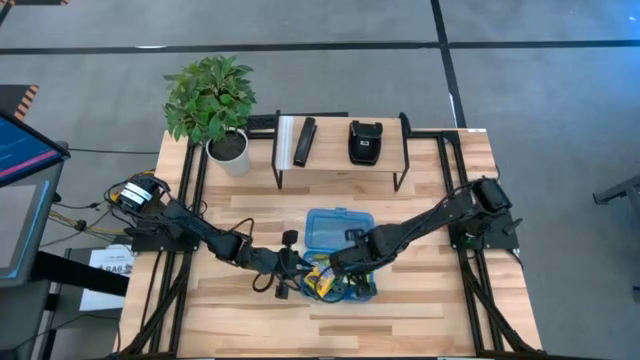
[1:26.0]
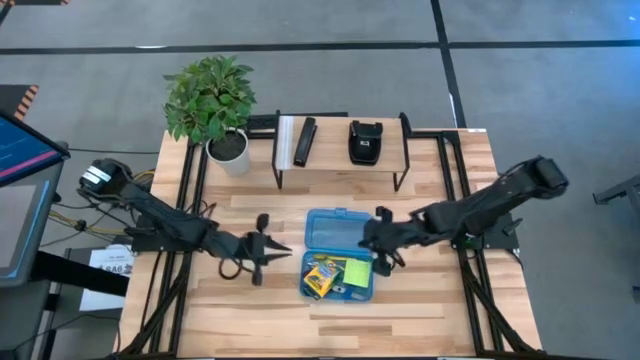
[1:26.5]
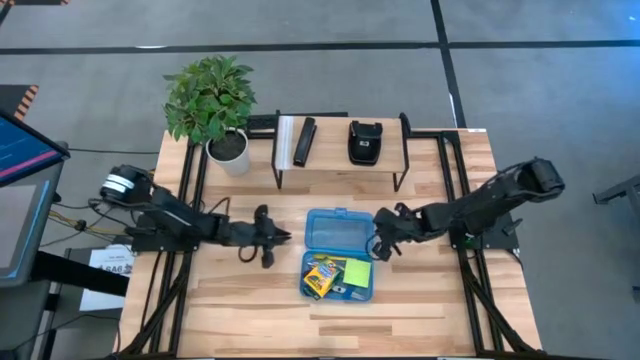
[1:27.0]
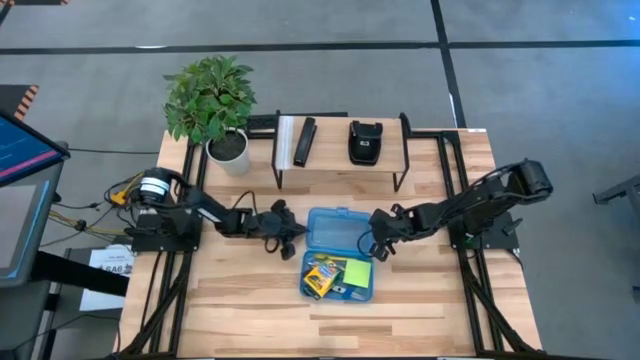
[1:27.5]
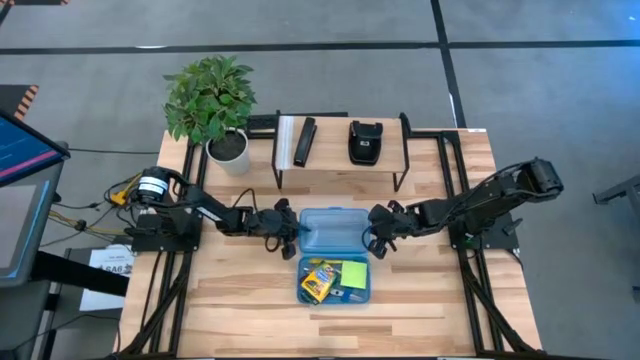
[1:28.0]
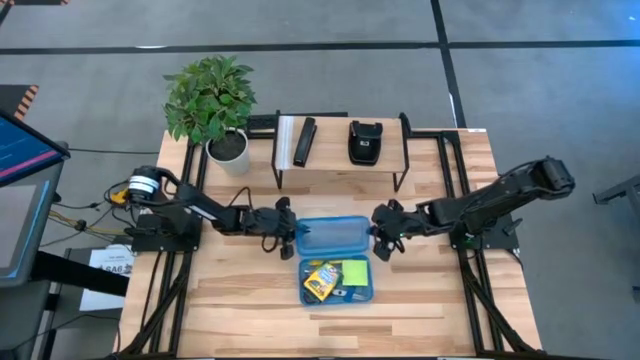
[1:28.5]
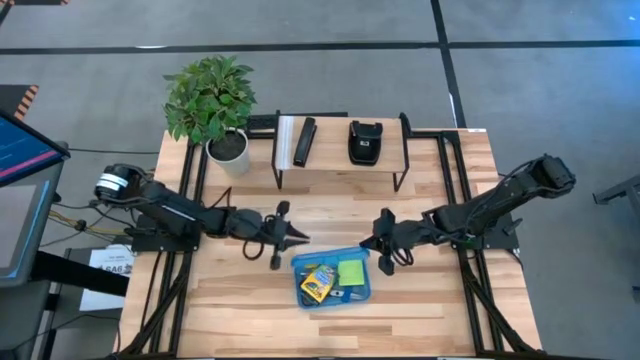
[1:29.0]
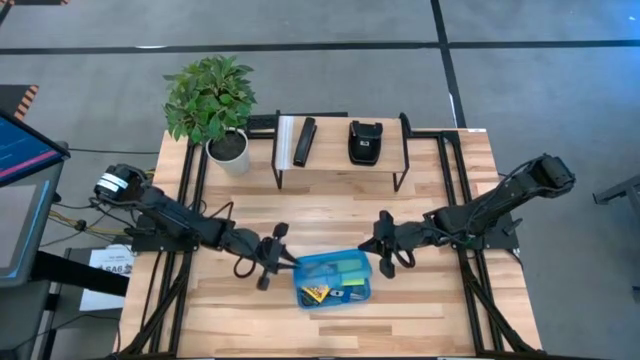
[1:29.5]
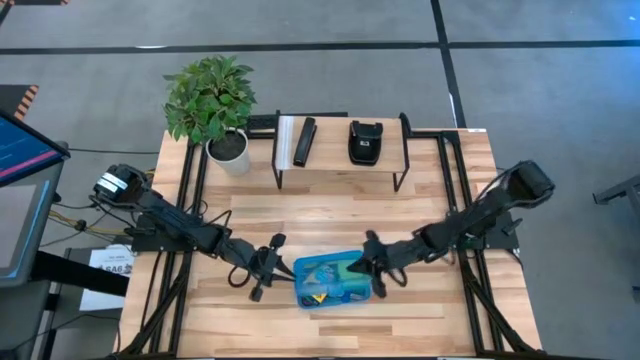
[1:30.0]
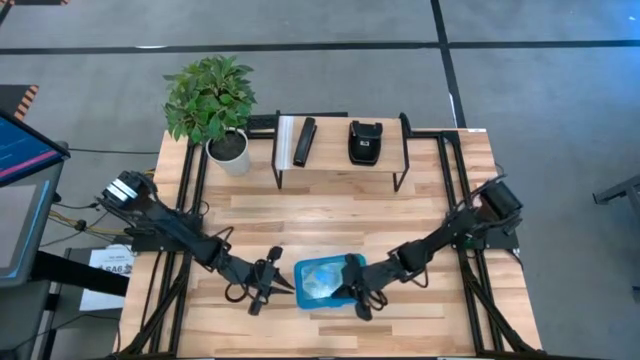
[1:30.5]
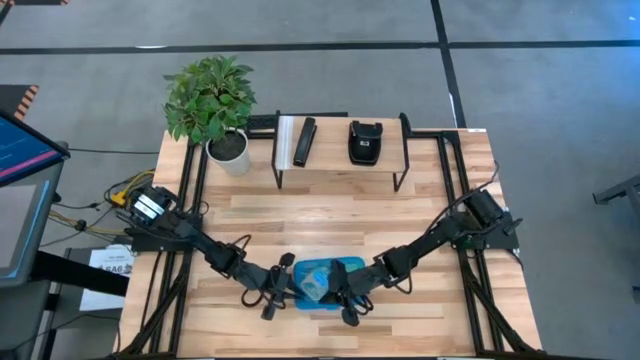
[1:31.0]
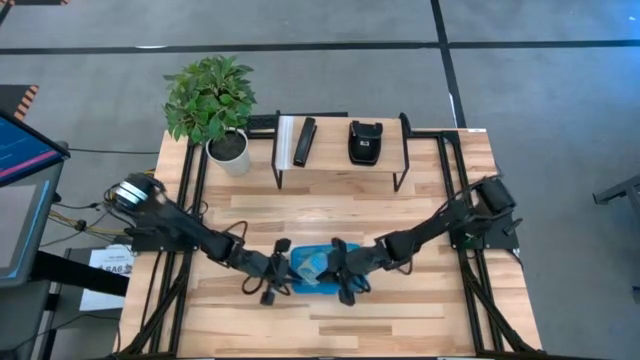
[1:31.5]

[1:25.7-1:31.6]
Task: Pack school essentials
Close the supply box

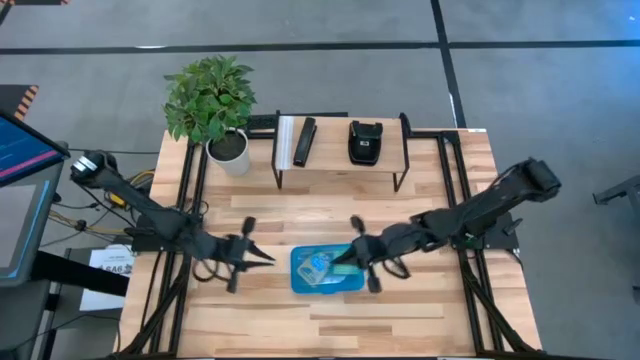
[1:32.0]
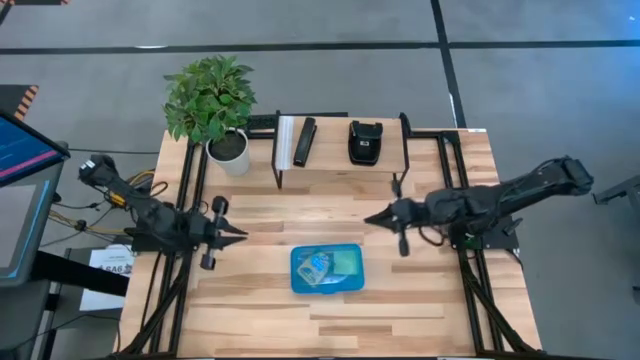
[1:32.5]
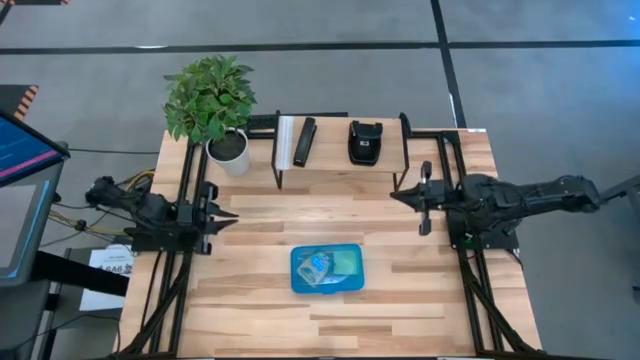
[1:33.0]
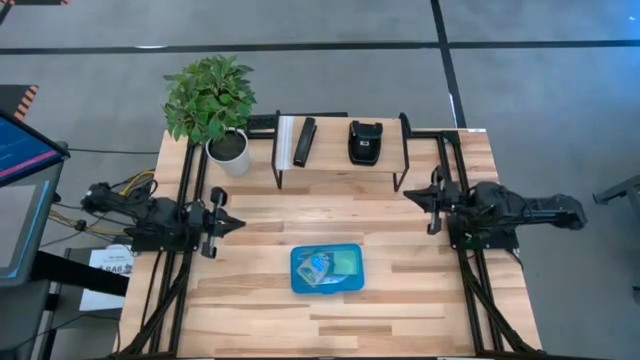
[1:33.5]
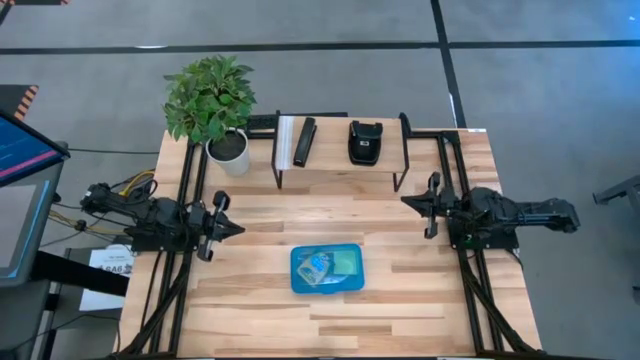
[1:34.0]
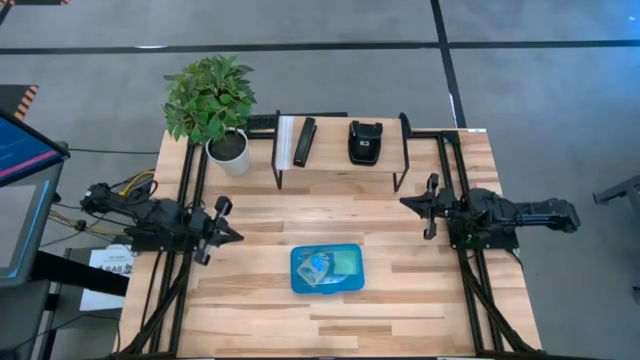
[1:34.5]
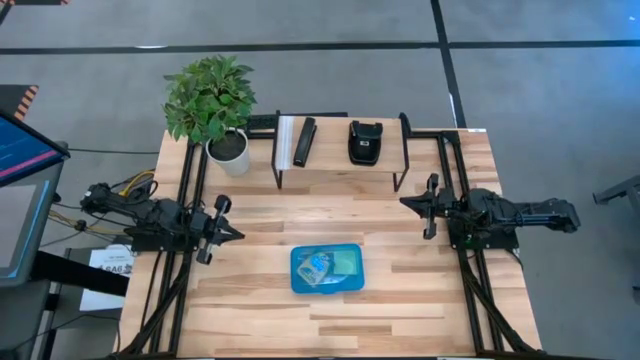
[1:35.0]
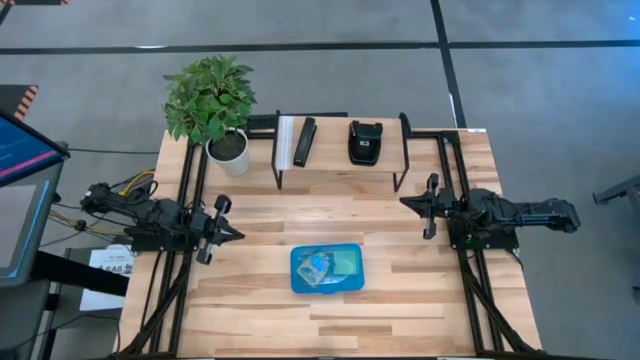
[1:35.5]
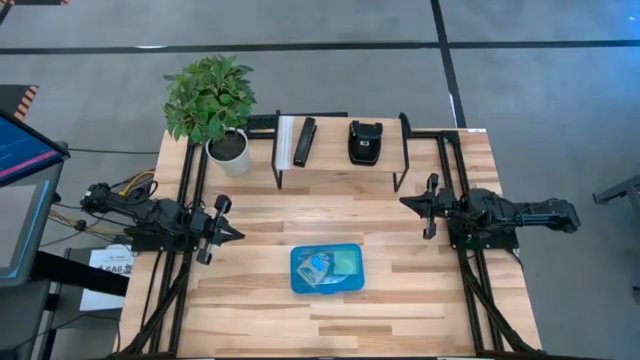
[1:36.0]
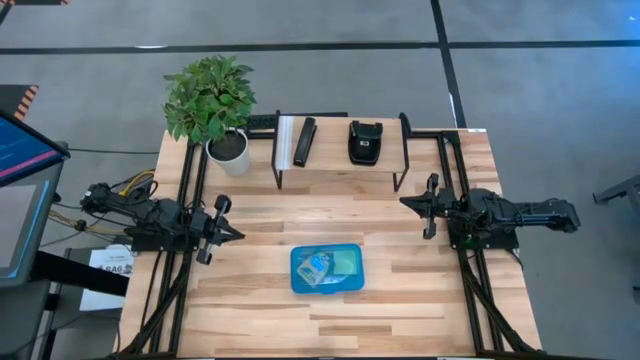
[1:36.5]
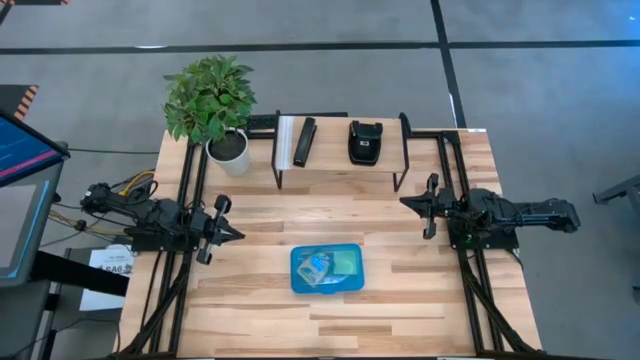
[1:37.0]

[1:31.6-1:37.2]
Return to Home Position

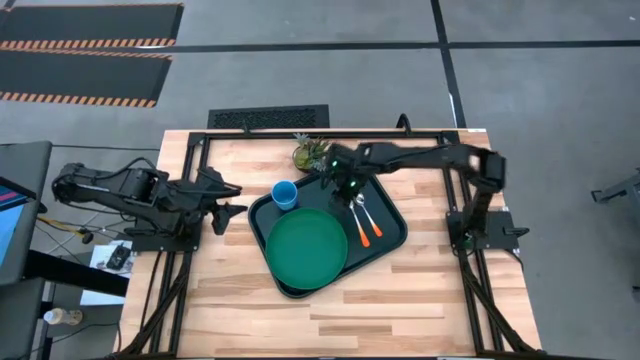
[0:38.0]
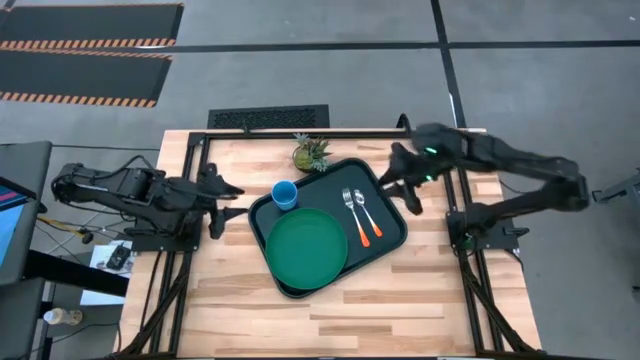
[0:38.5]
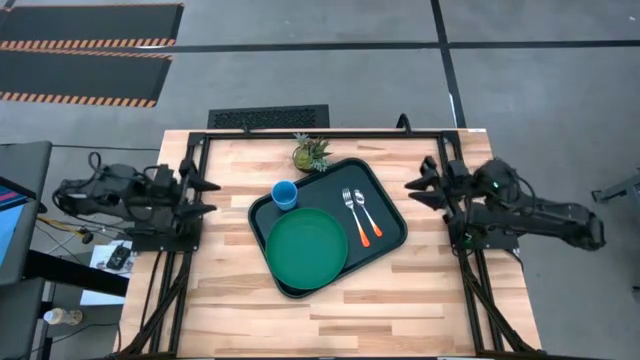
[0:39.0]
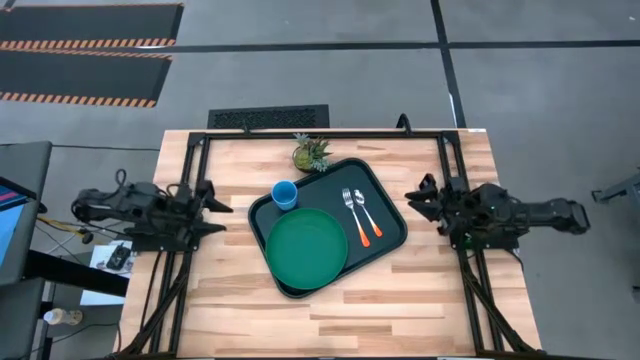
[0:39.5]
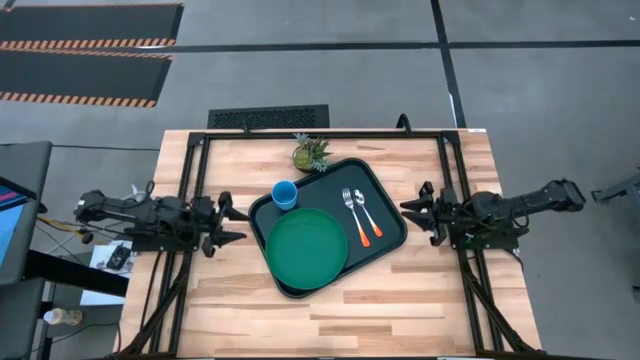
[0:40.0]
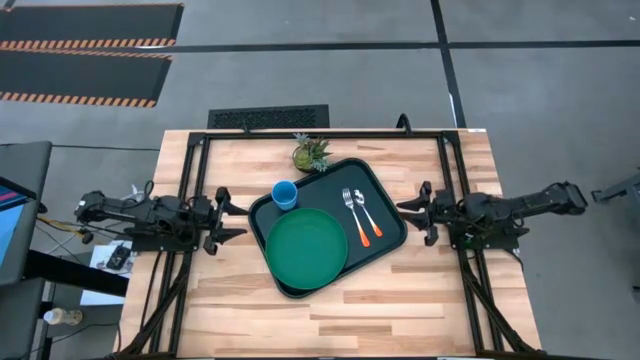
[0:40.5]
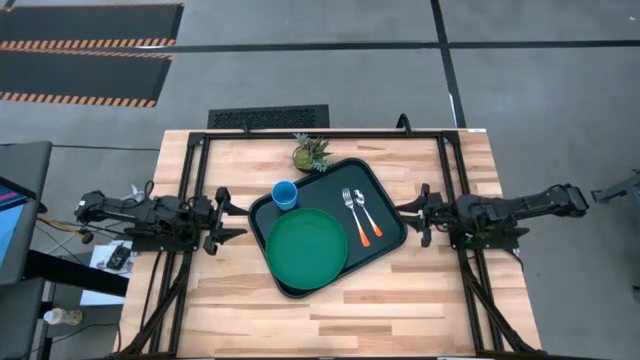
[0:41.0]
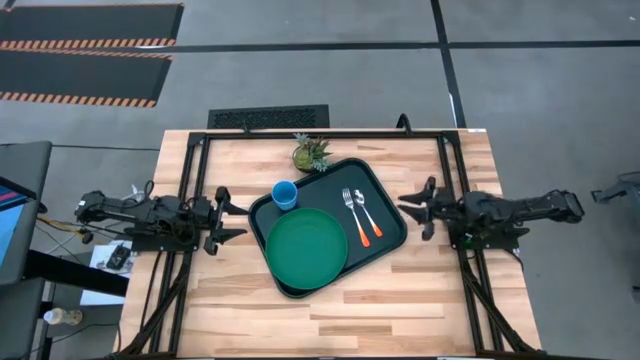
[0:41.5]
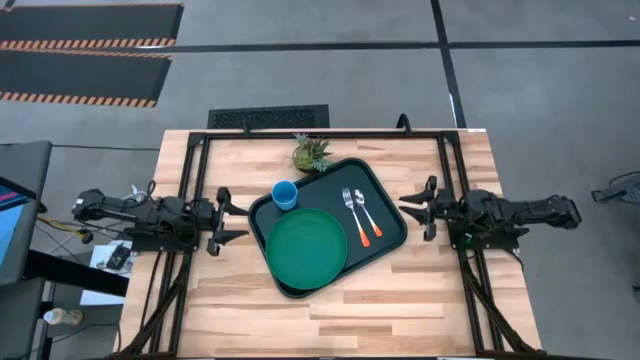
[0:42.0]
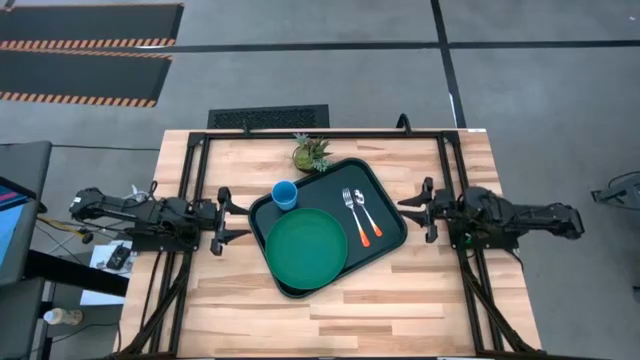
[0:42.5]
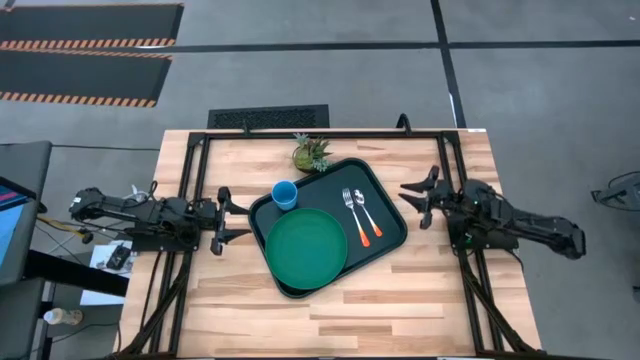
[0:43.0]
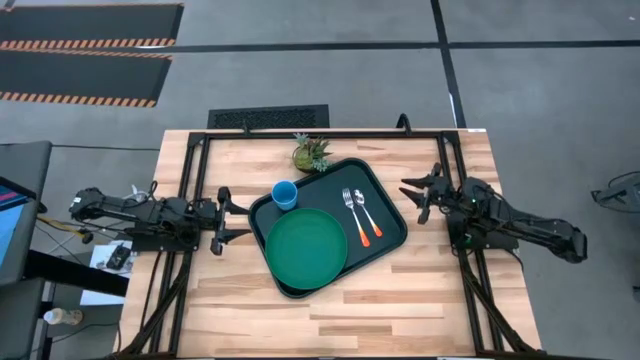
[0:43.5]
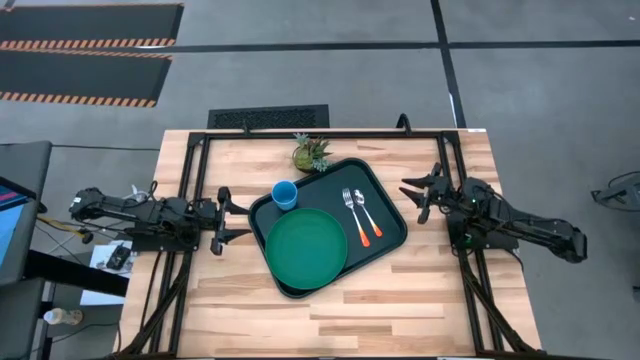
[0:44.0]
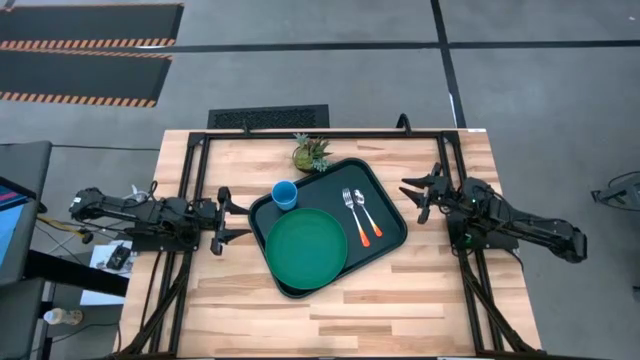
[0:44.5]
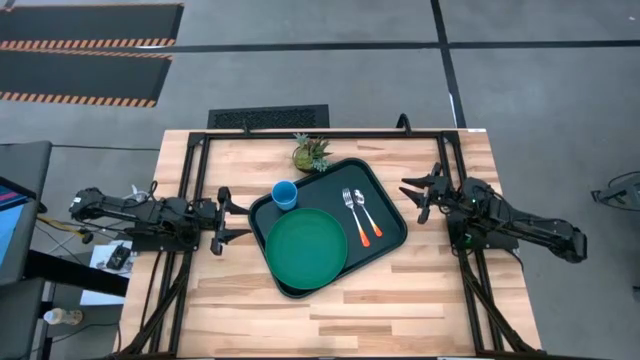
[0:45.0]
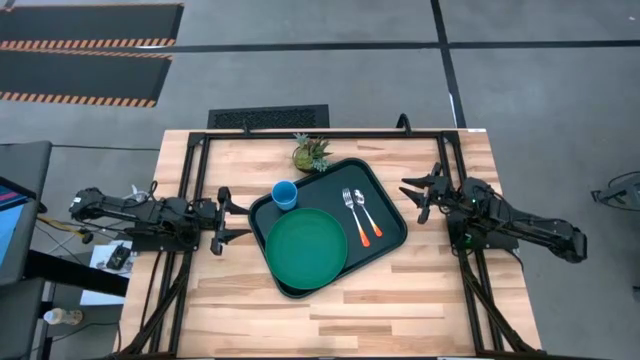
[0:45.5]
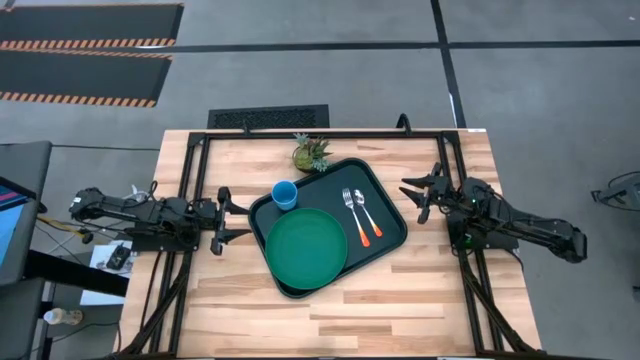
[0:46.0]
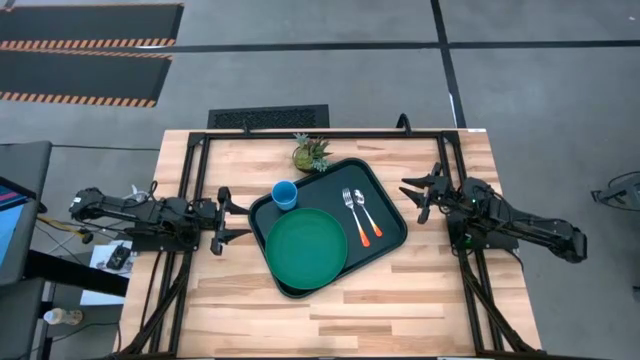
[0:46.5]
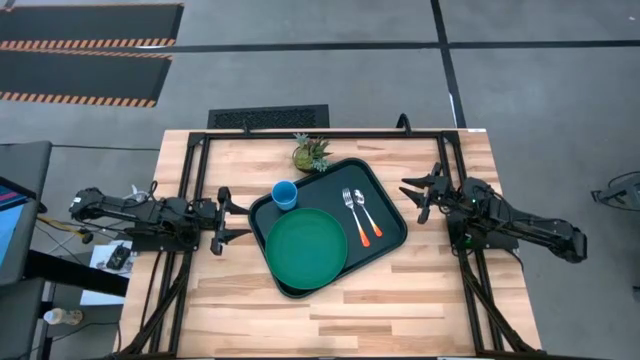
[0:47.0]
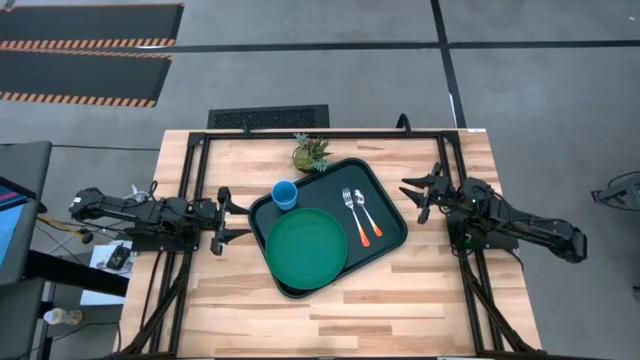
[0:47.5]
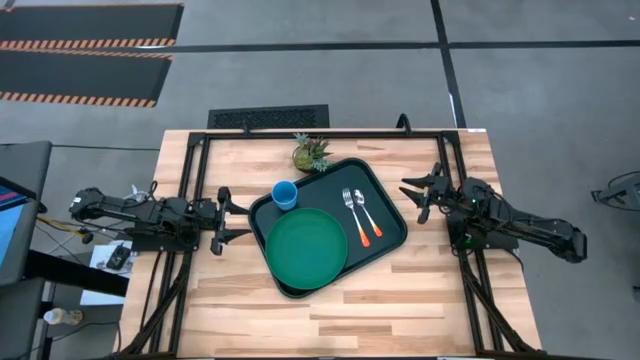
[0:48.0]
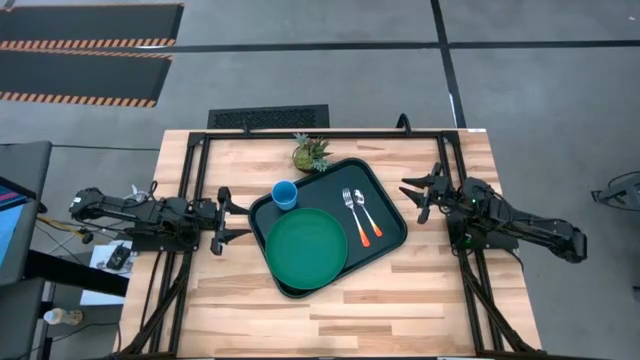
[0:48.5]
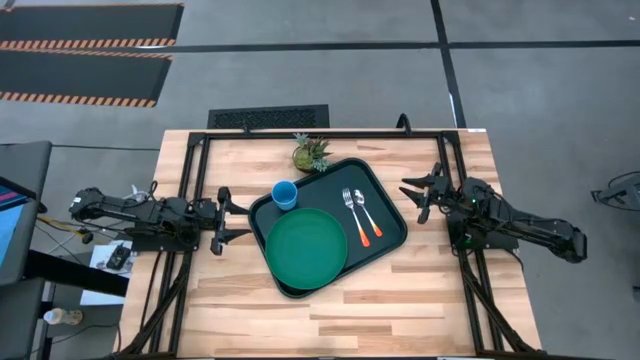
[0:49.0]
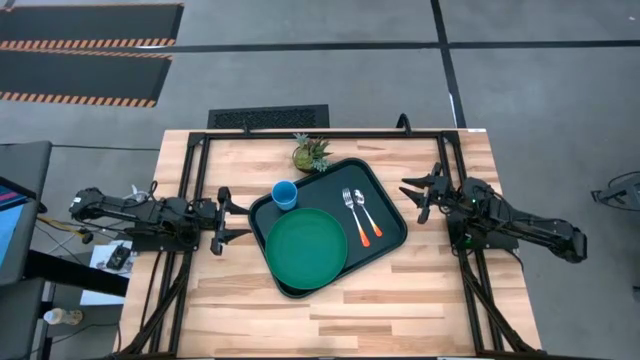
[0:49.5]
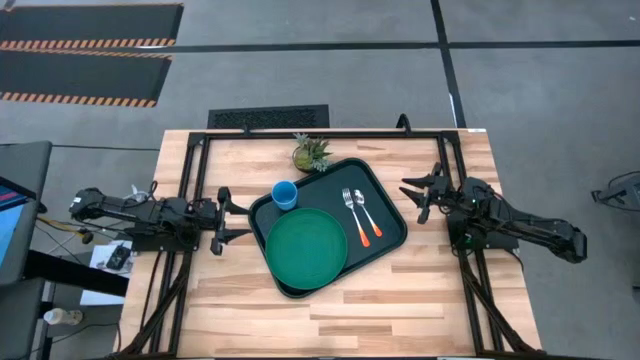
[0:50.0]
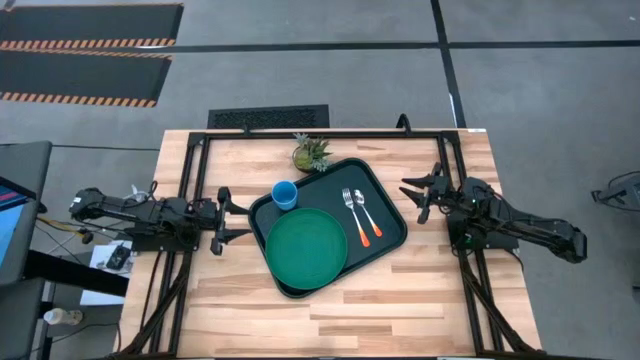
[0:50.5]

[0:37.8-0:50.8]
Task: Pick and place plate/cup/fork/spoon on tray
Return to Home Position
